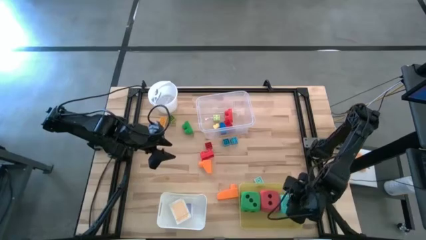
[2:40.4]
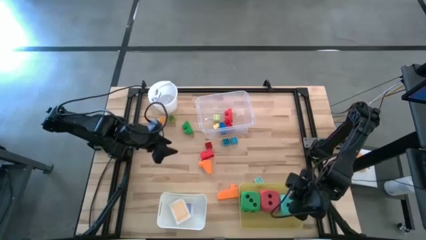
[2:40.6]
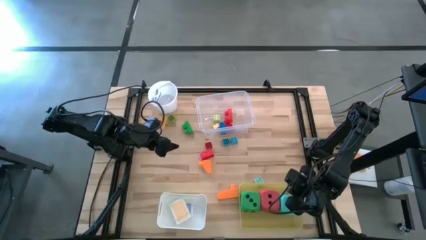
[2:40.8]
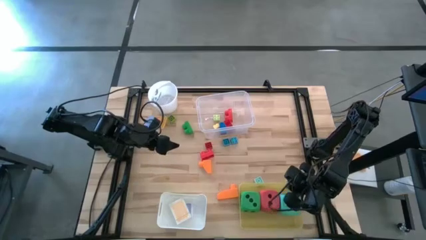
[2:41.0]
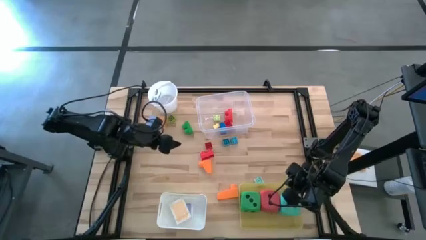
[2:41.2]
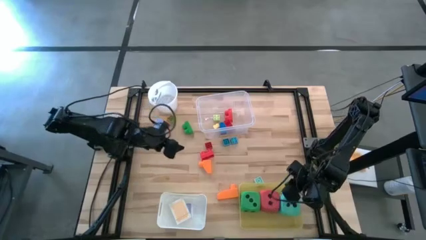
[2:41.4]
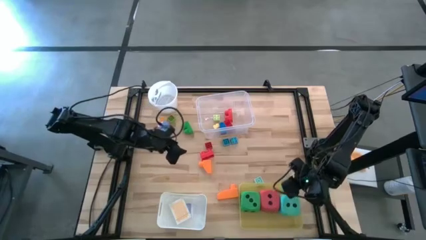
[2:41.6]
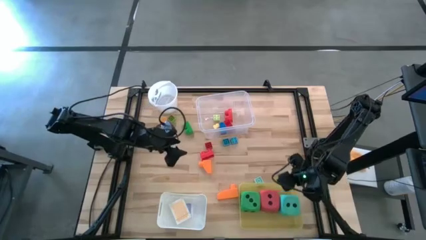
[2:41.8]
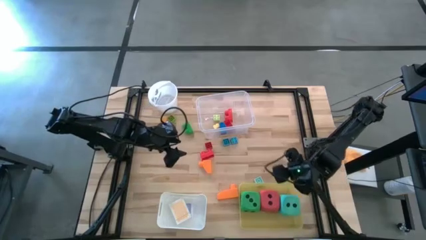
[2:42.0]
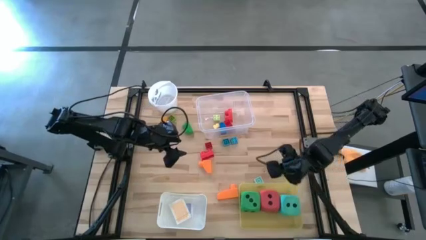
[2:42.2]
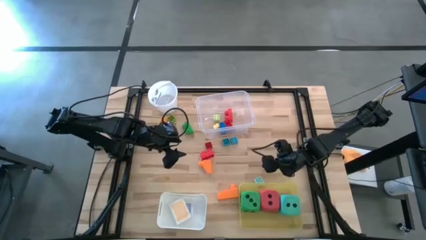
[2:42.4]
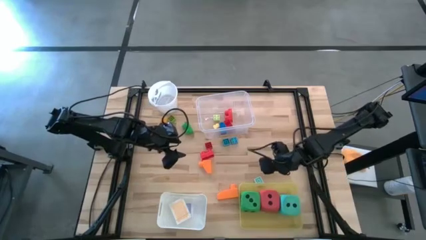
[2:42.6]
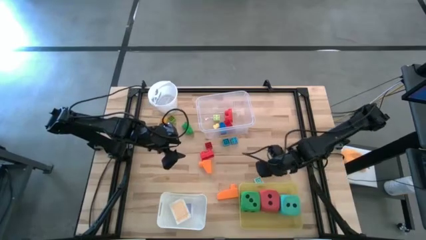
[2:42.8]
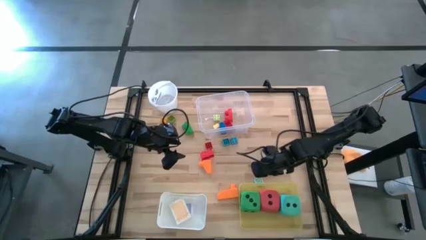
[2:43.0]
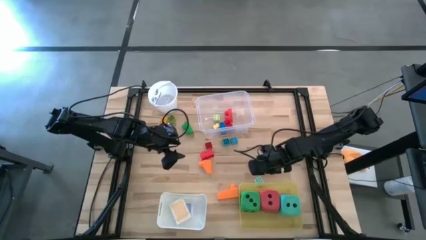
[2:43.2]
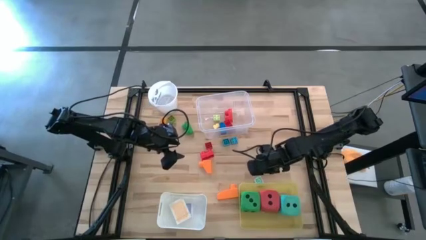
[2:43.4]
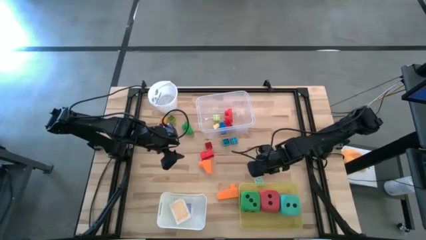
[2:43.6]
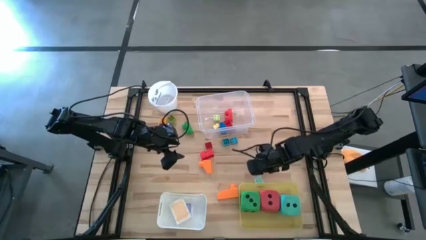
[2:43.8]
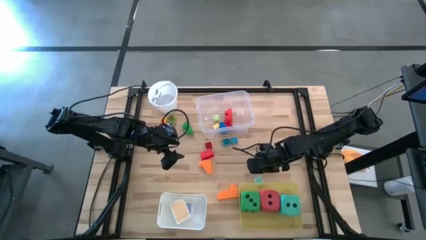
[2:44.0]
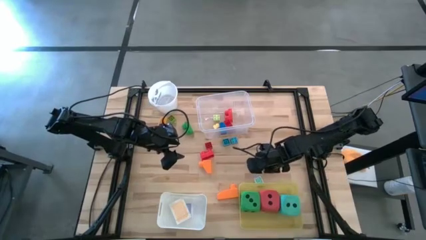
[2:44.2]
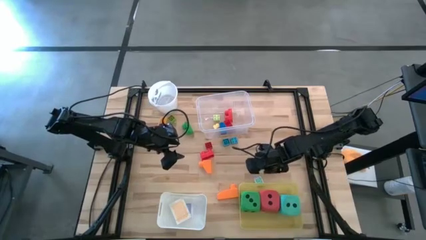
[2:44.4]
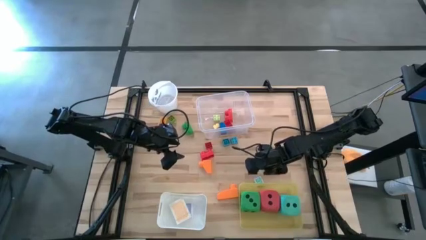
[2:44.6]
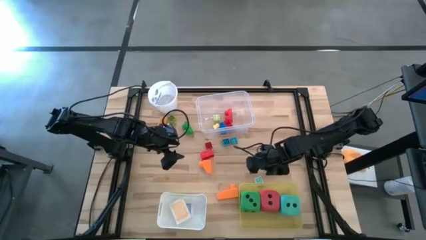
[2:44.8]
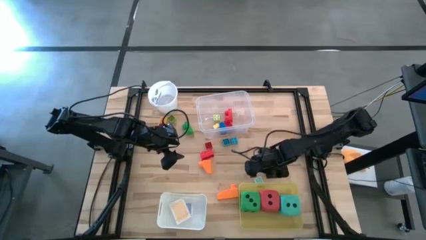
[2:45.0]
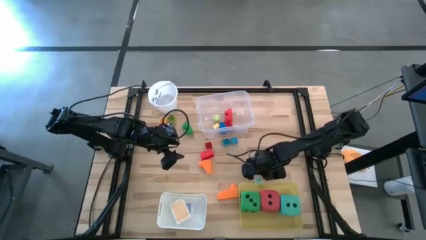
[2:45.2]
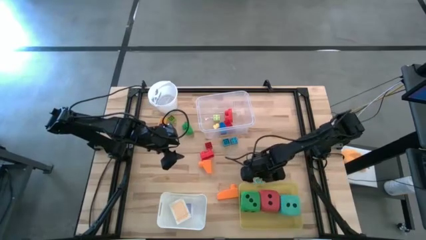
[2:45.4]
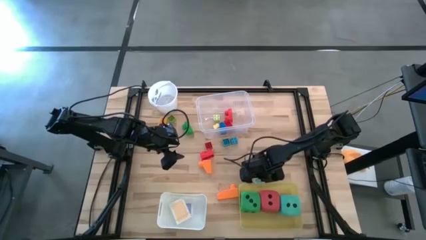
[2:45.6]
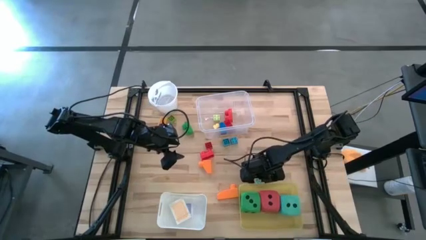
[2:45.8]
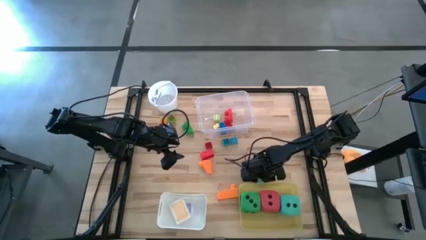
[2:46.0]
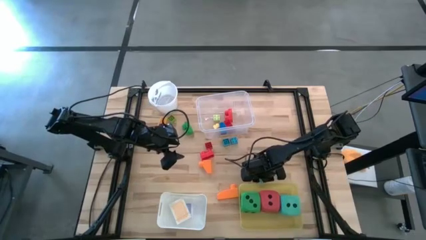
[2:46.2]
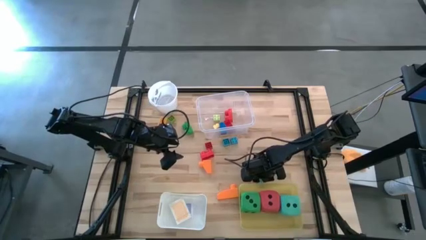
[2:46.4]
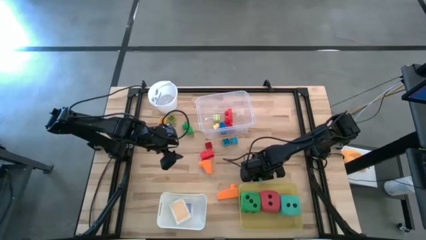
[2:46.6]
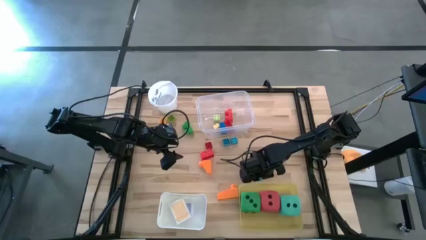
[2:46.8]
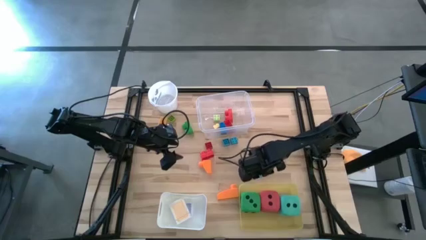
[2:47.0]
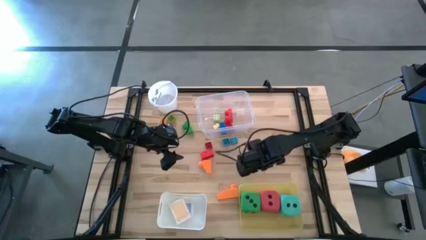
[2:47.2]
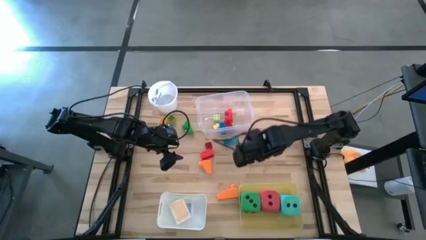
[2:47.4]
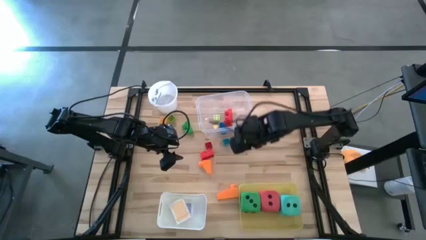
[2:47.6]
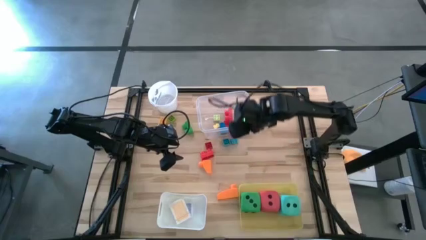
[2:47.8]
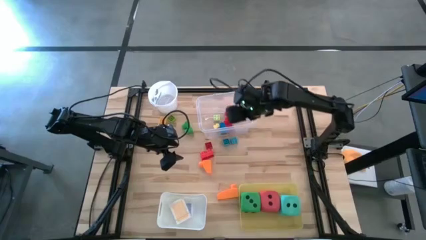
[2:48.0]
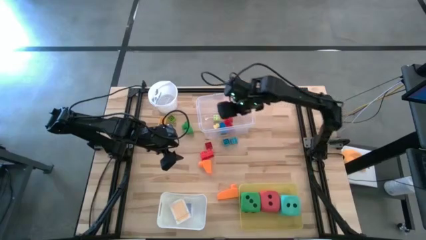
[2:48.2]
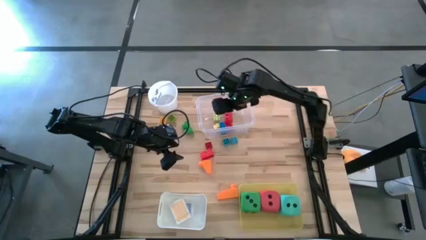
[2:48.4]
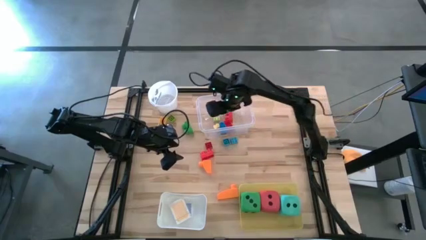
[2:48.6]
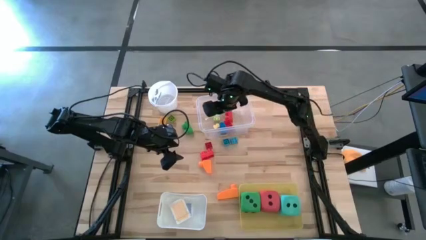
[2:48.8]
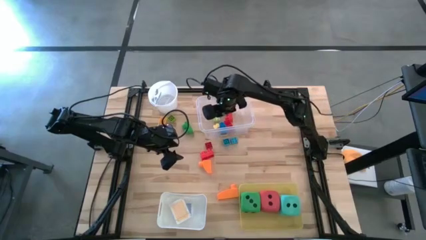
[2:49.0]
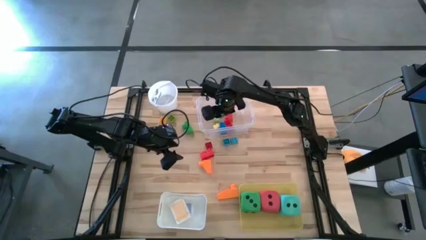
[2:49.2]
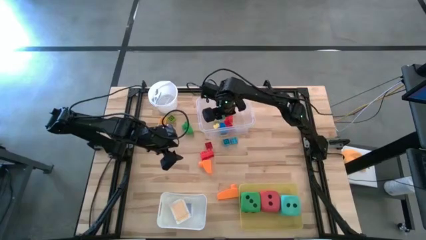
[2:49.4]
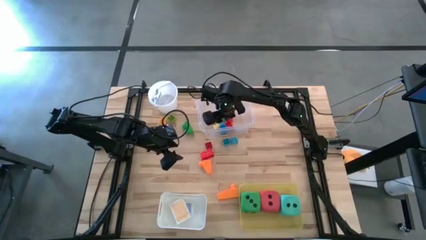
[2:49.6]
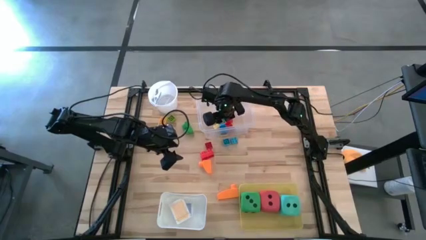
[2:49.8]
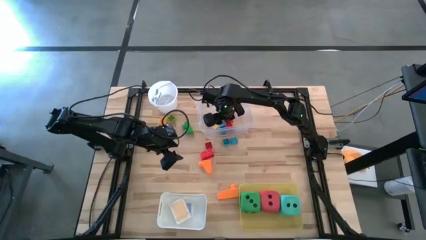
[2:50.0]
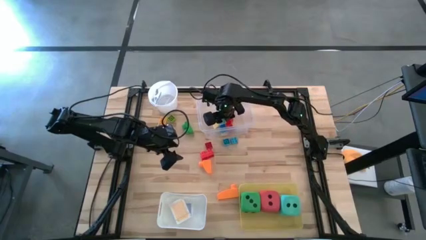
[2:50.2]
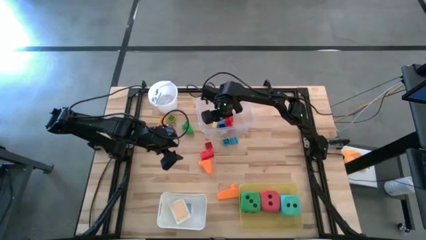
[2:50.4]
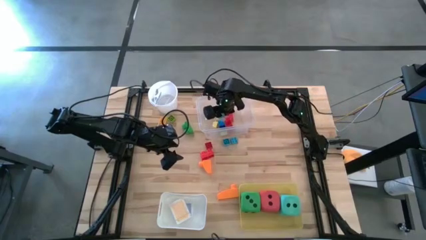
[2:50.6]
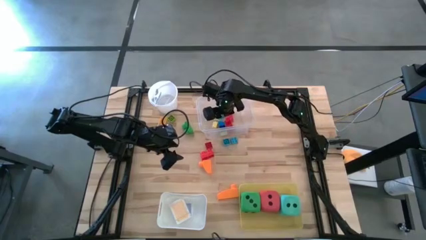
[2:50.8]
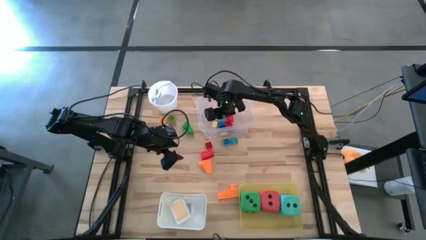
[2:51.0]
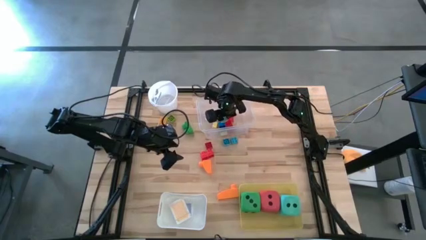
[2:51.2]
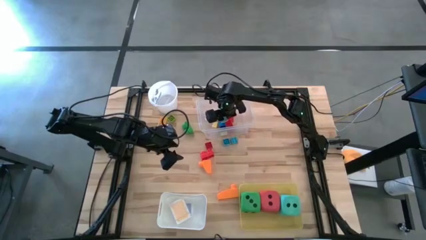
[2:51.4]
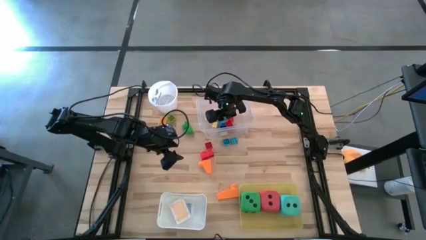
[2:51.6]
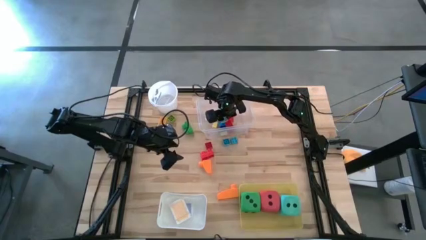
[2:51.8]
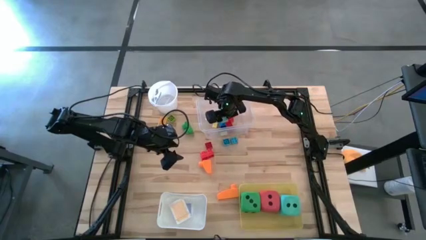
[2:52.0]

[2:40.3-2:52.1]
Task: Pick & Place Toys
Put the light blue game piece into the transparent bin

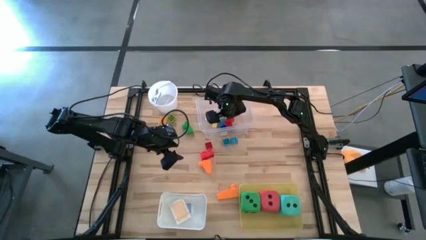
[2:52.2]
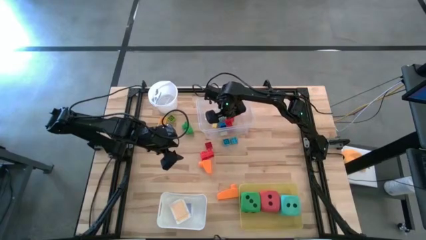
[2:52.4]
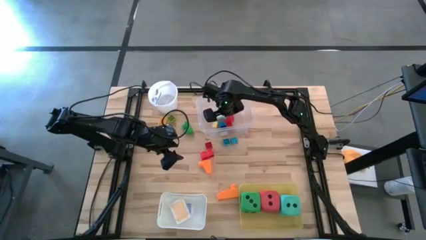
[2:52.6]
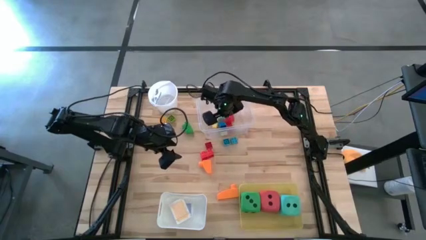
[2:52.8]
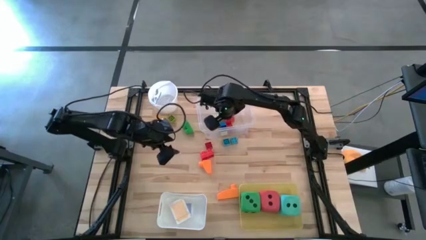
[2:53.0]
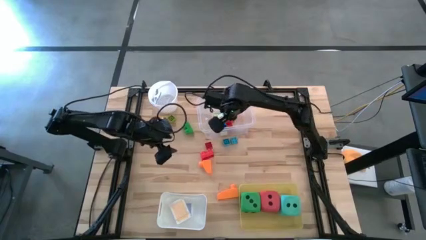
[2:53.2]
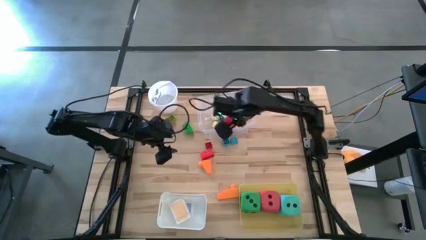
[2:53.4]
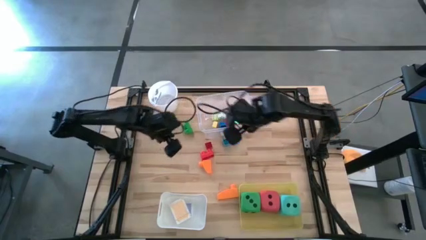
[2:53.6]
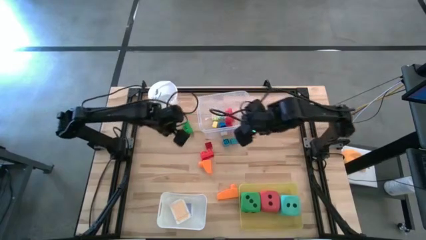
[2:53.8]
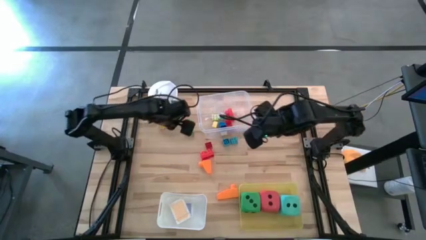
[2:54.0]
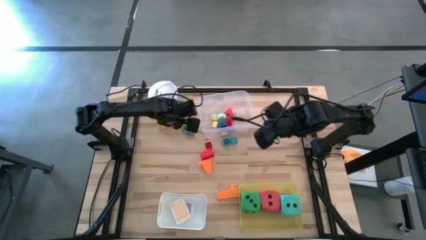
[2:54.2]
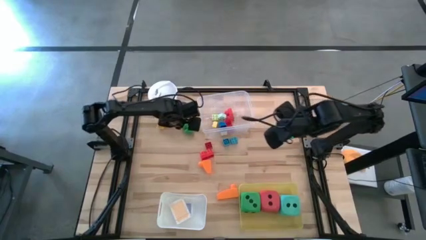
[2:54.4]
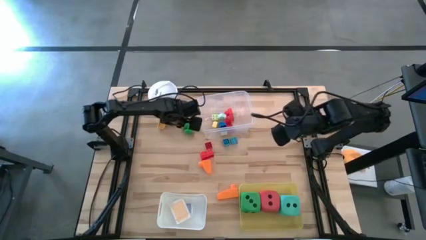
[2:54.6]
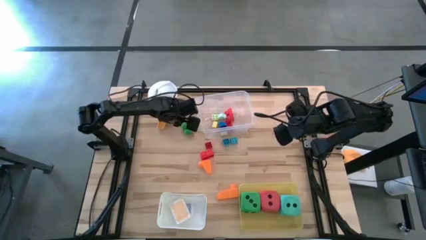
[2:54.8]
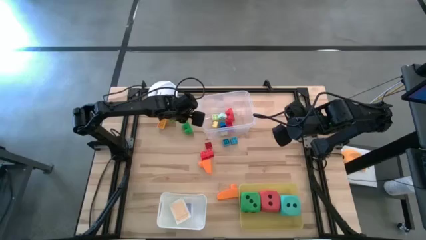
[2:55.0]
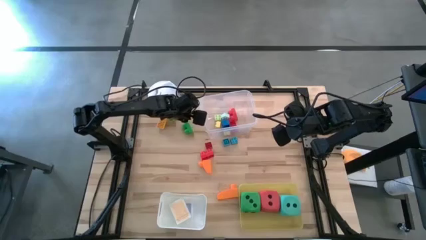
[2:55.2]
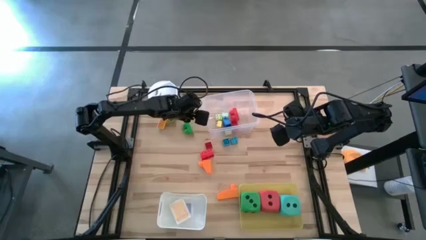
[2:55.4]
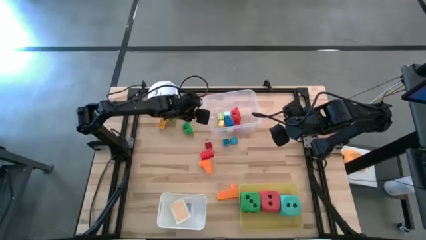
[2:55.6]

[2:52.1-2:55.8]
Adjust the transparent bin on the table

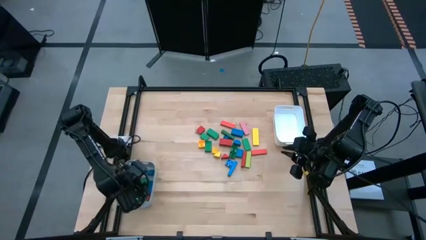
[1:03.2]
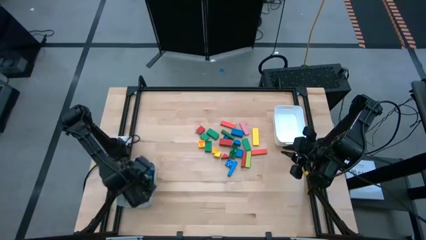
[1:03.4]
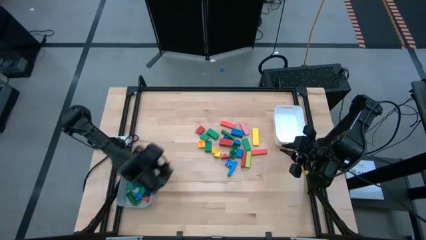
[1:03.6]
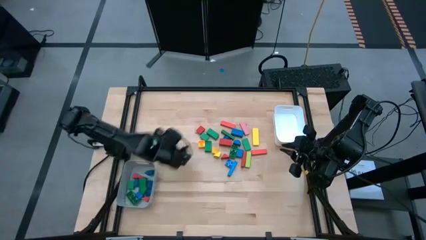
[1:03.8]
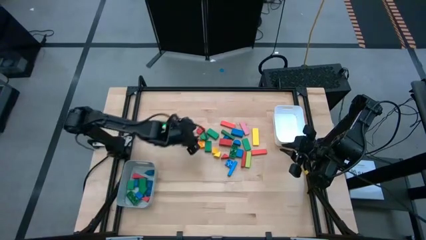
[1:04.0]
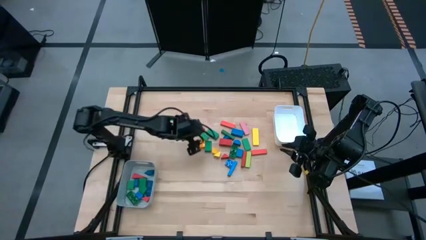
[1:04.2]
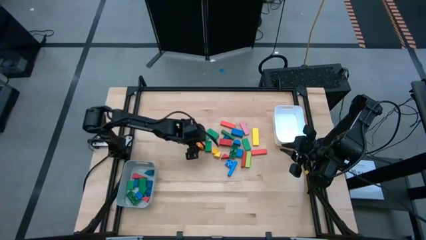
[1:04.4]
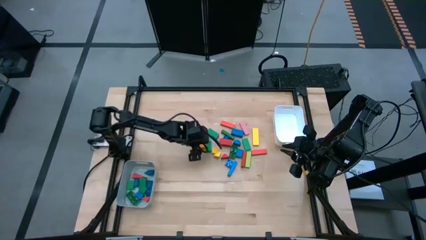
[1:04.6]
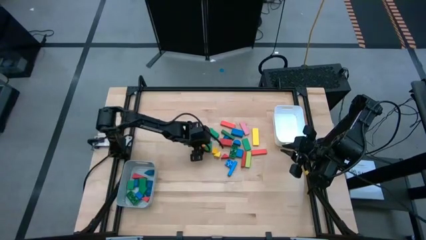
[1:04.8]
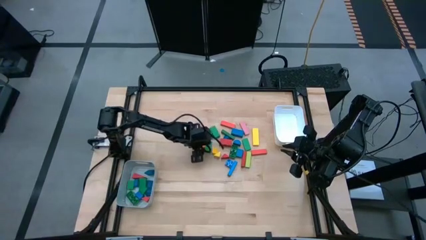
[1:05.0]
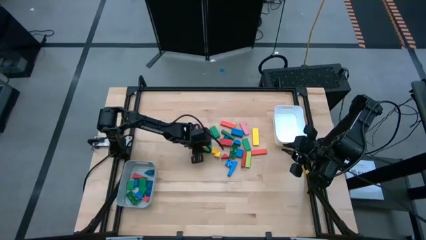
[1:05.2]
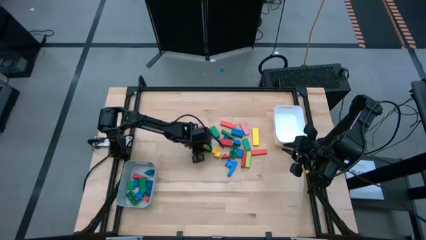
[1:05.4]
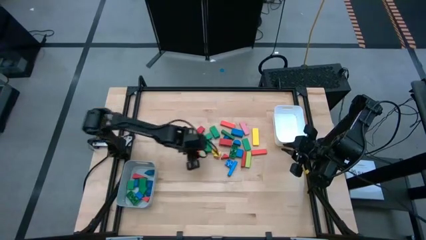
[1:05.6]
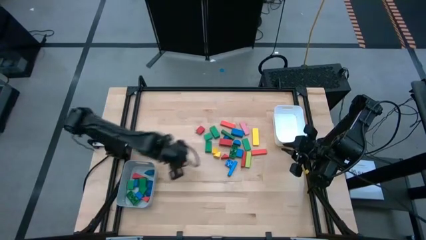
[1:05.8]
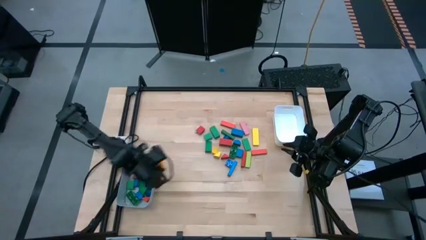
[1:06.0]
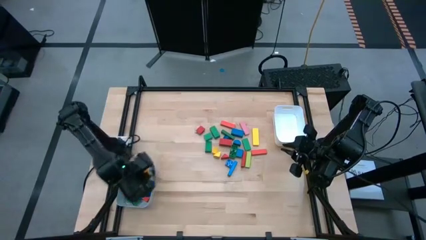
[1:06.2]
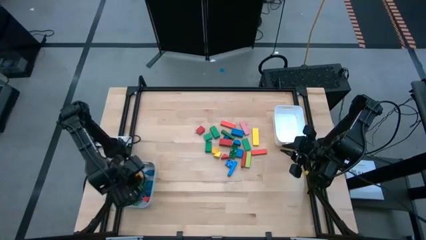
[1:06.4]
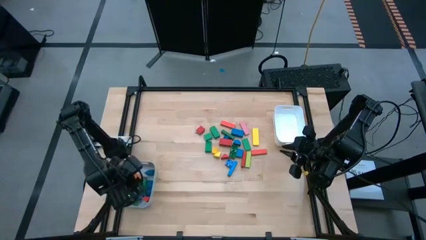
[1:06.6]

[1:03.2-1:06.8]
Task: Sort blocks by size
Put the yellow game piece into the gray bin
